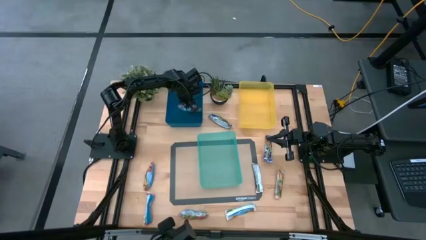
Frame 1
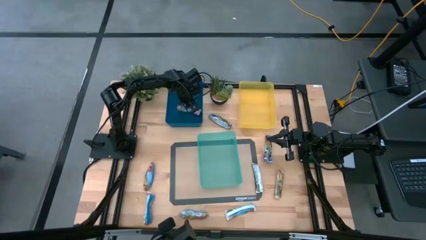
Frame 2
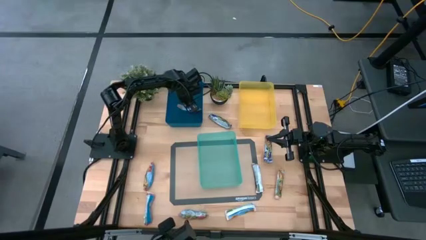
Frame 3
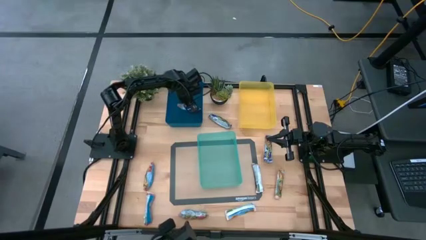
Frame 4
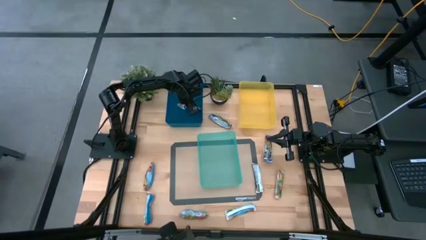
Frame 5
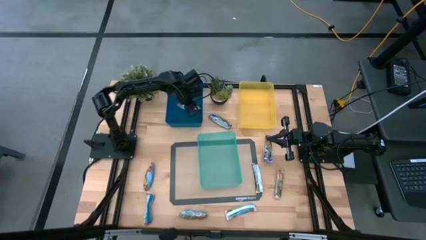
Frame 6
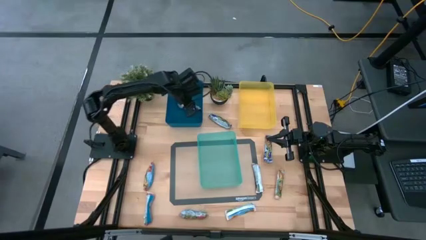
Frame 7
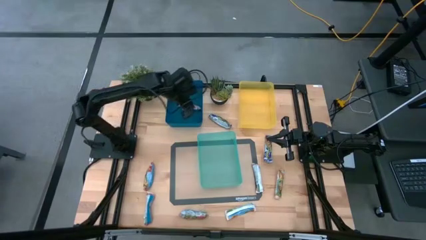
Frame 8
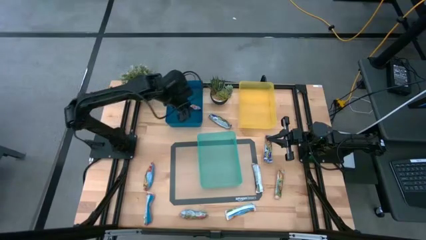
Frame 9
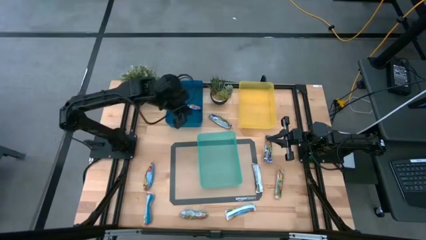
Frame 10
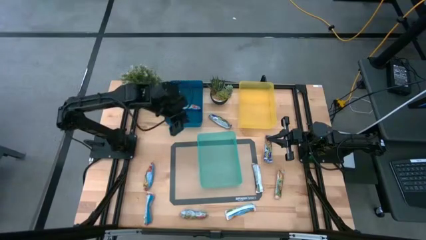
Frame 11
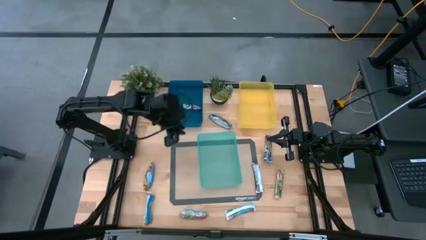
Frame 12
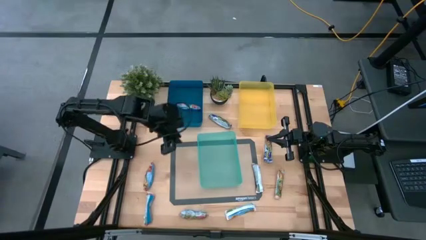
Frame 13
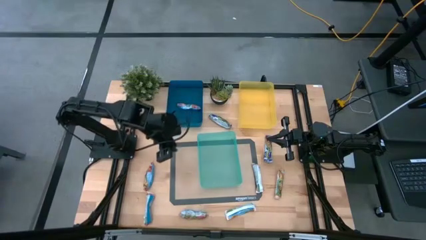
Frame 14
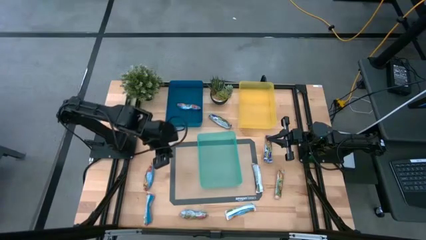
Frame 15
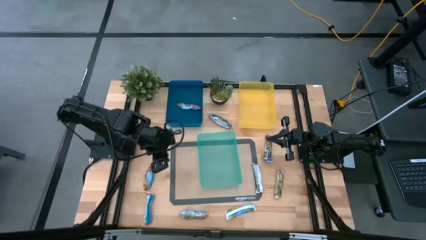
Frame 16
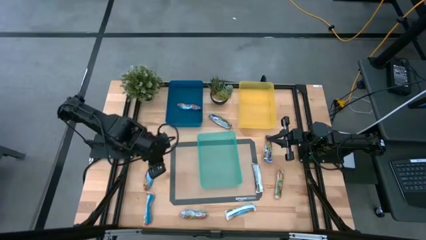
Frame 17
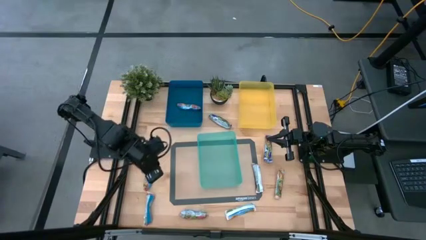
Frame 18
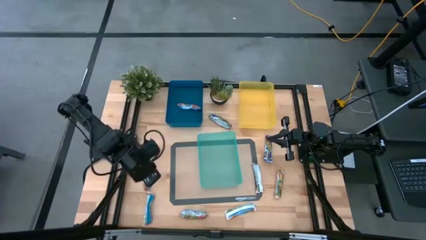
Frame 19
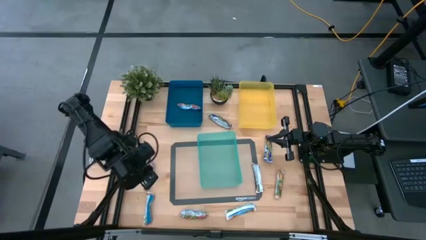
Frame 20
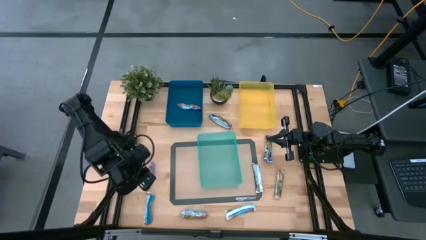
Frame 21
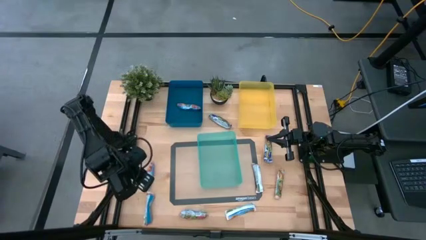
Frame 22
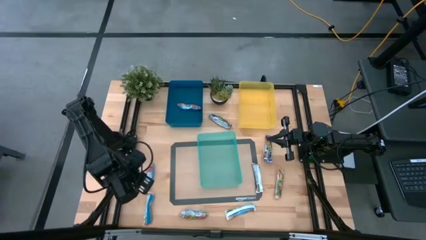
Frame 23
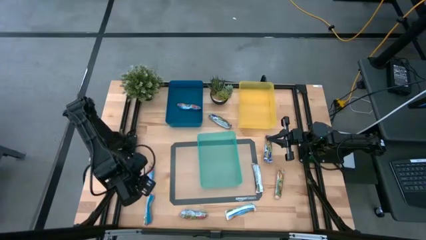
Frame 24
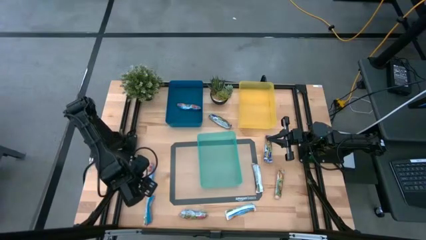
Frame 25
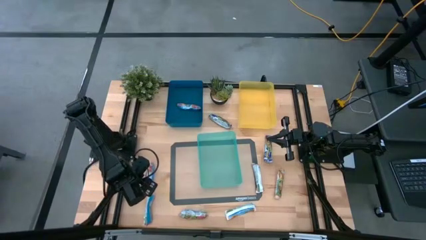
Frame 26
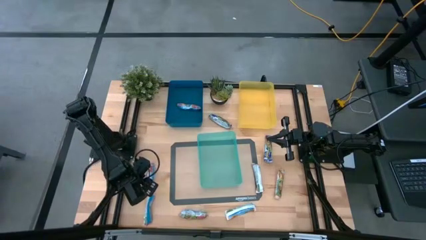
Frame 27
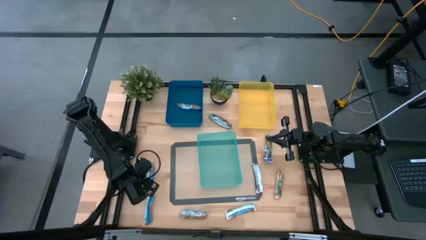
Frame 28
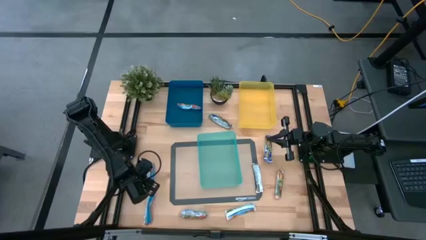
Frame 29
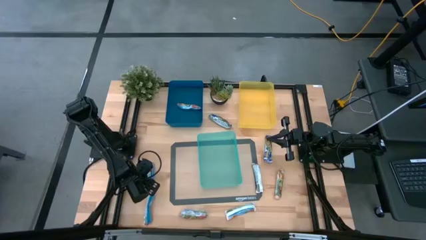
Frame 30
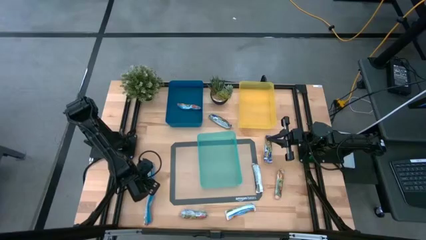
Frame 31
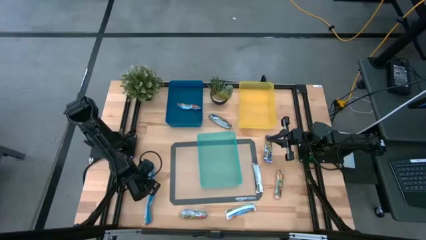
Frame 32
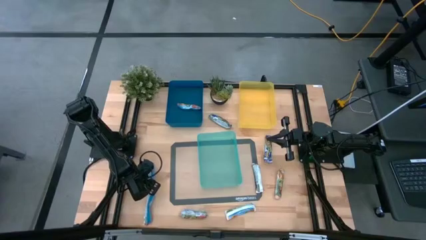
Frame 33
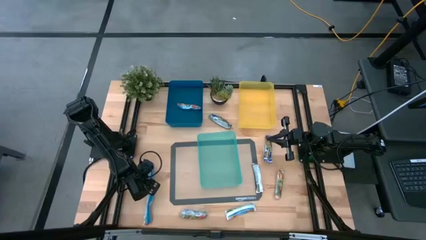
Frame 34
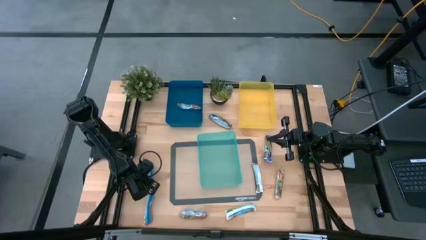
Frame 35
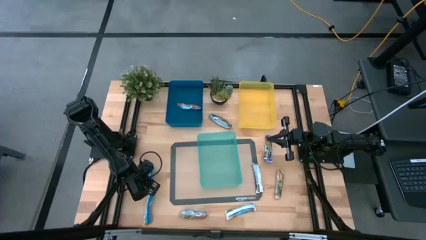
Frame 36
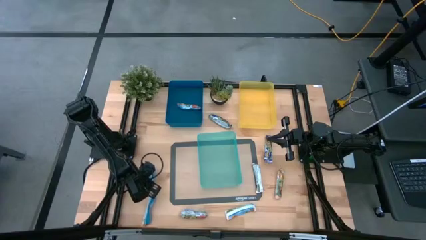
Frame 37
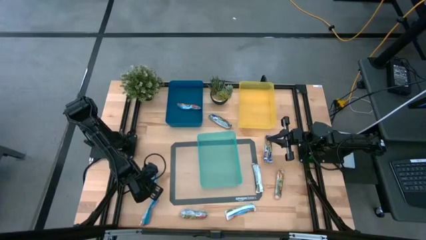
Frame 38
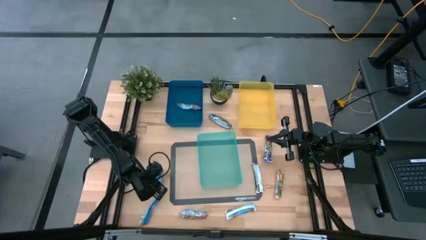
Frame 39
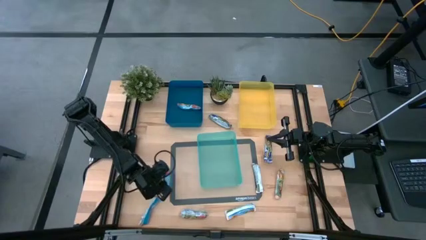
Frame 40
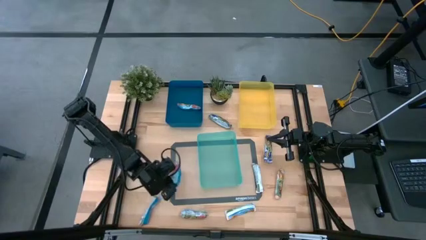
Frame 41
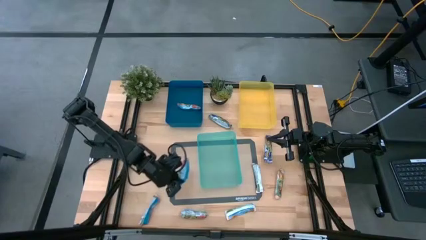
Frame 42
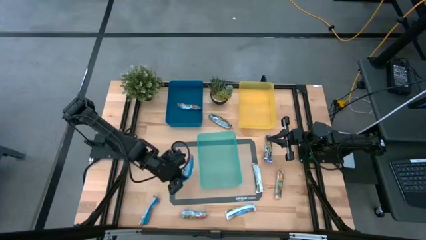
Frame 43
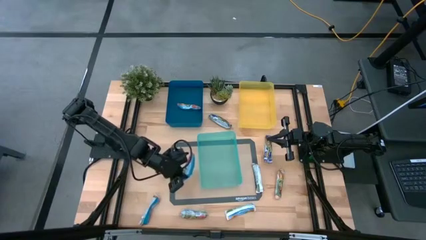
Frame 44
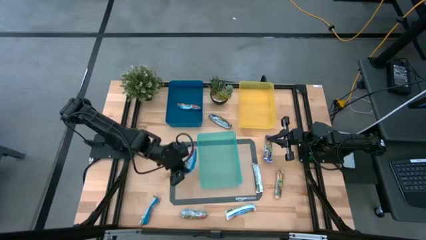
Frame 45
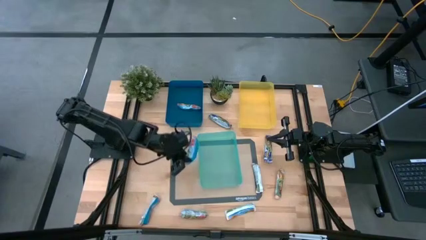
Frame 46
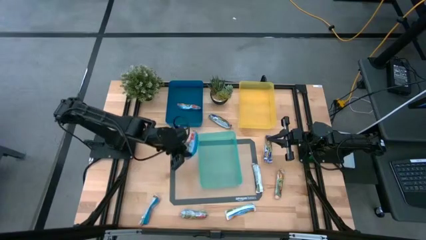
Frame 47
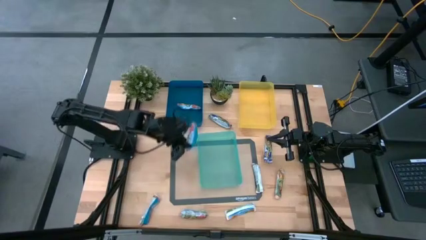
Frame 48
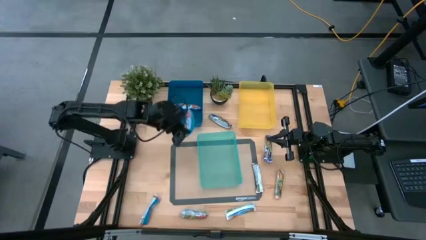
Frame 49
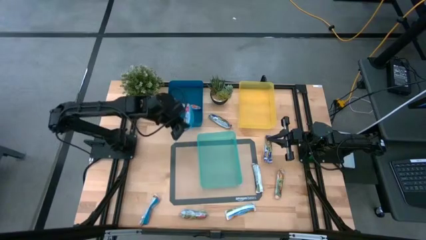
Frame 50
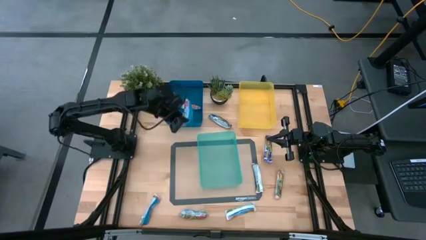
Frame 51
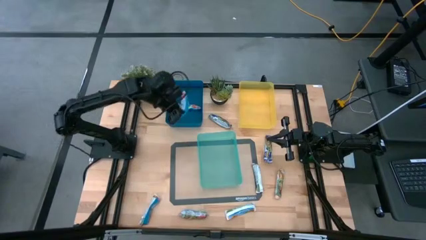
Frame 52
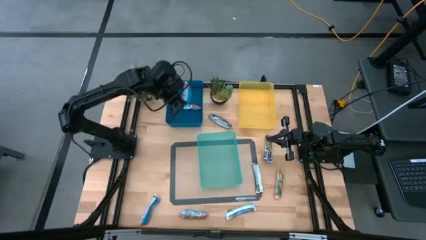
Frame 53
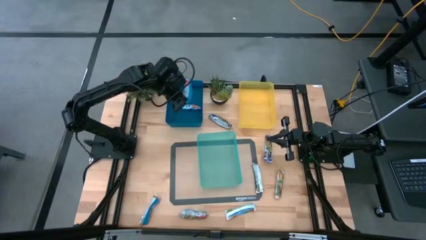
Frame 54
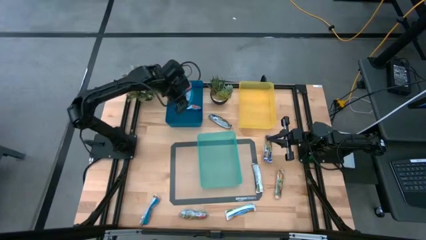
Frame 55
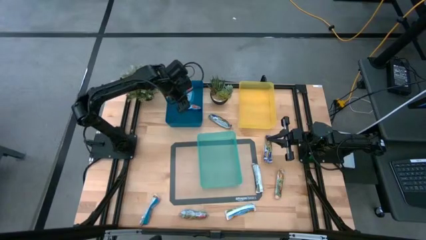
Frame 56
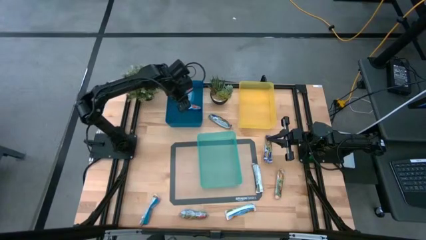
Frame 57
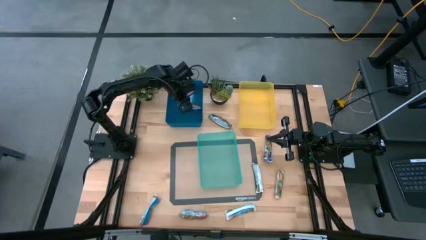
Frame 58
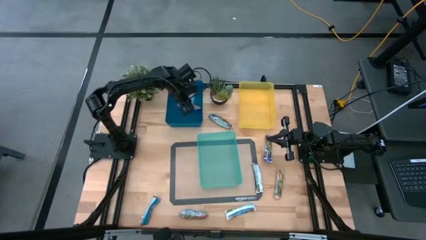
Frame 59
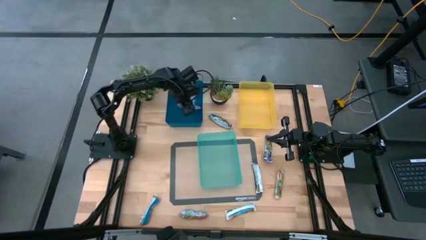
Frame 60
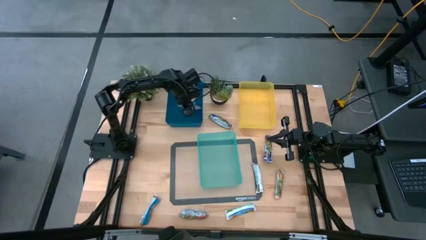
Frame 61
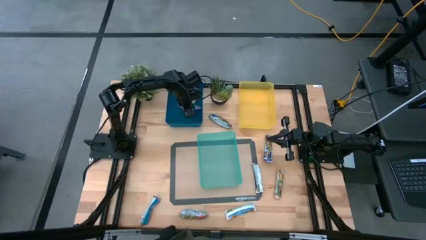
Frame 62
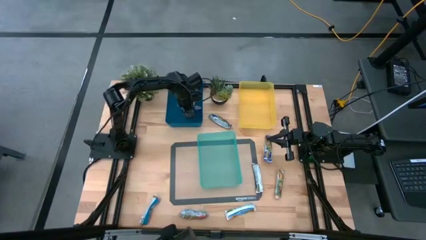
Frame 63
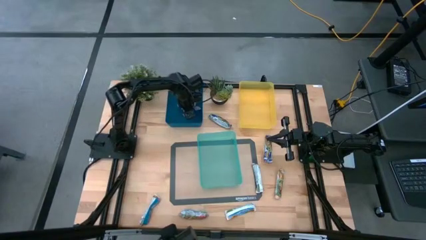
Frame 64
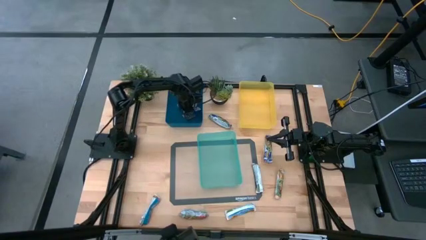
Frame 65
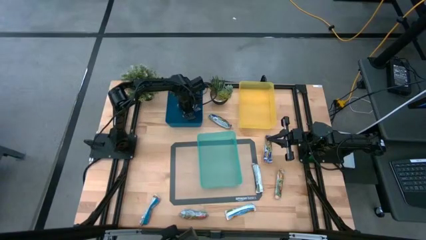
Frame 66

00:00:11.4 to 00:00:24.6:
Task: Pick and place Granola Bars by type
Put the red granola bar into the dark blue bin

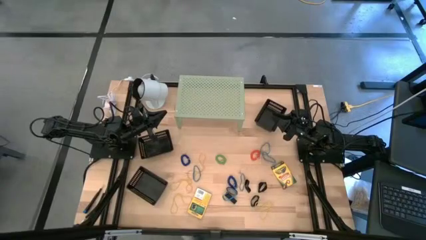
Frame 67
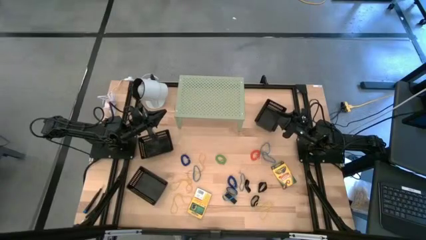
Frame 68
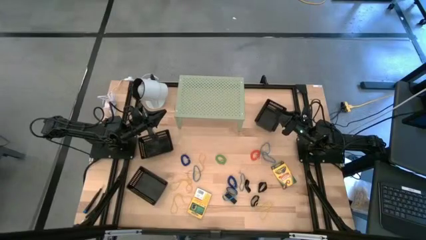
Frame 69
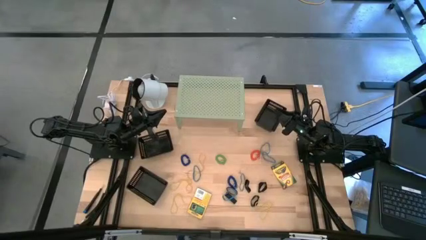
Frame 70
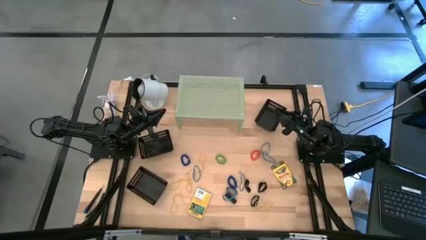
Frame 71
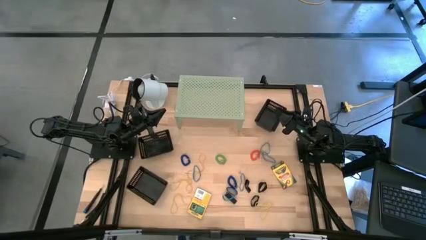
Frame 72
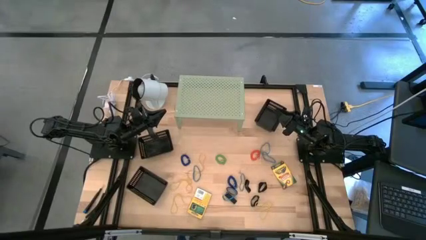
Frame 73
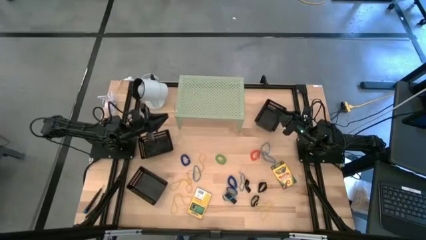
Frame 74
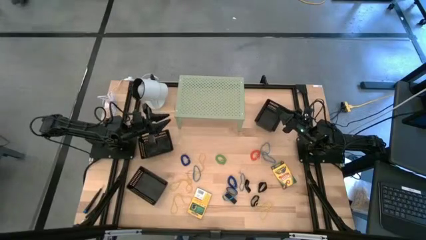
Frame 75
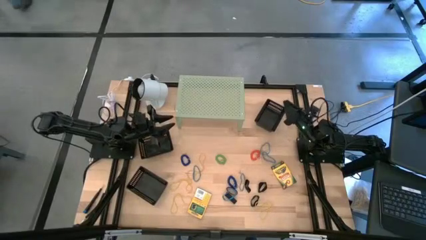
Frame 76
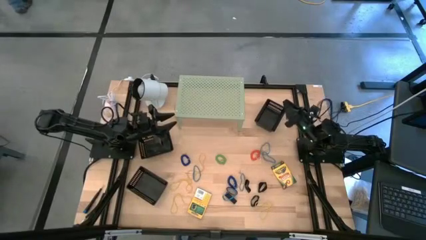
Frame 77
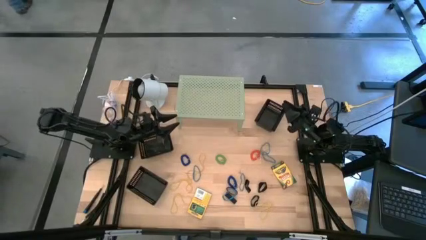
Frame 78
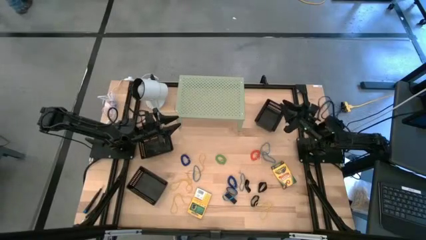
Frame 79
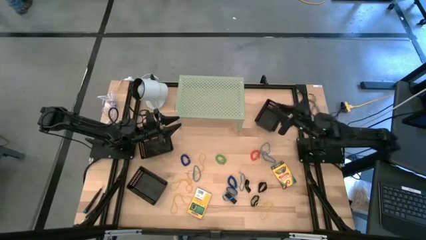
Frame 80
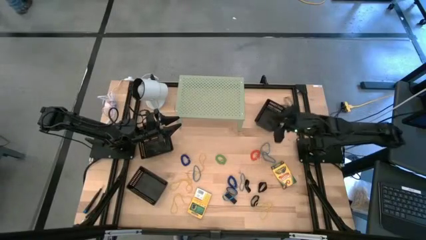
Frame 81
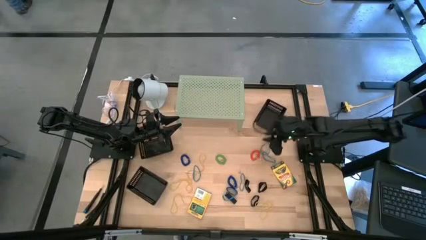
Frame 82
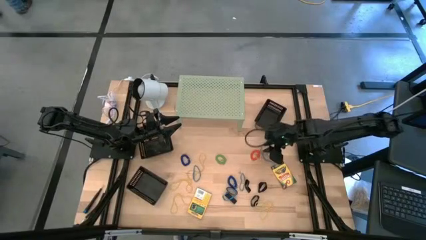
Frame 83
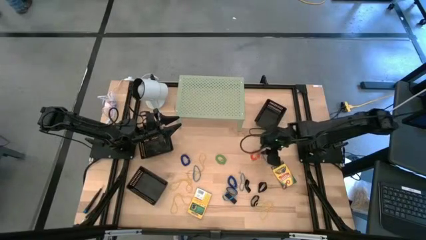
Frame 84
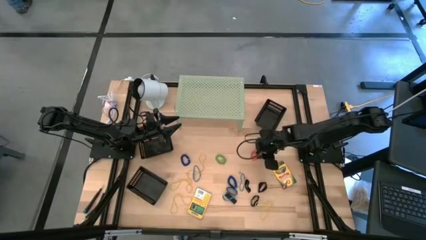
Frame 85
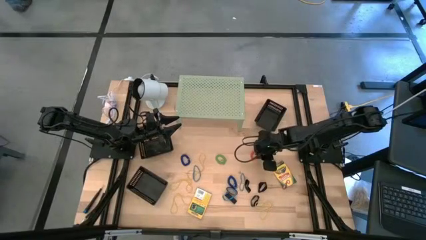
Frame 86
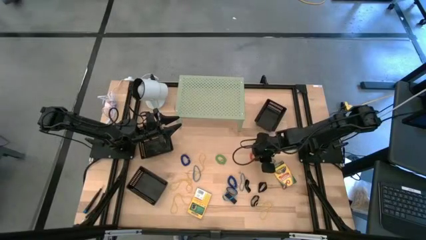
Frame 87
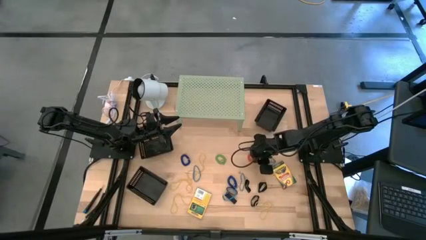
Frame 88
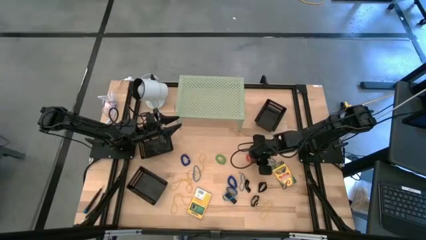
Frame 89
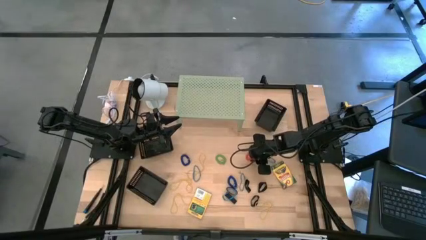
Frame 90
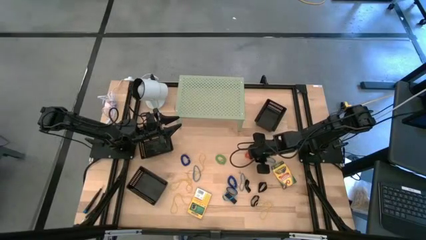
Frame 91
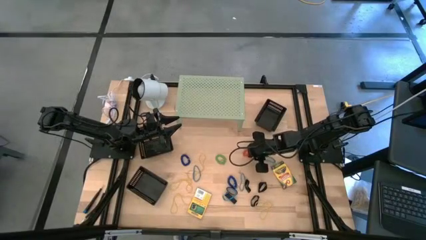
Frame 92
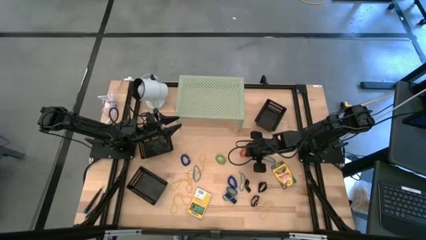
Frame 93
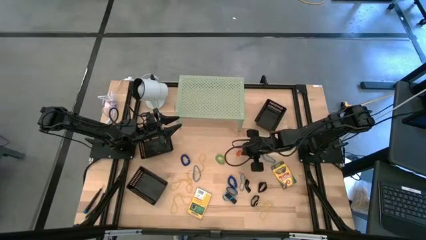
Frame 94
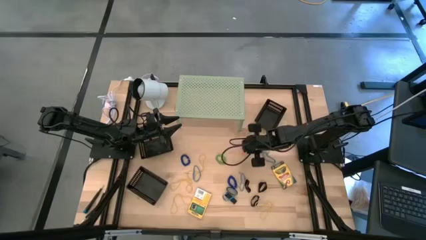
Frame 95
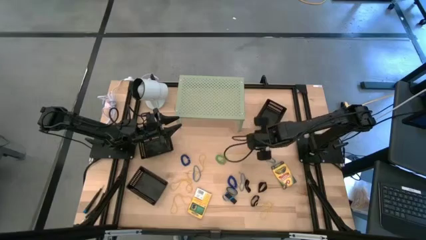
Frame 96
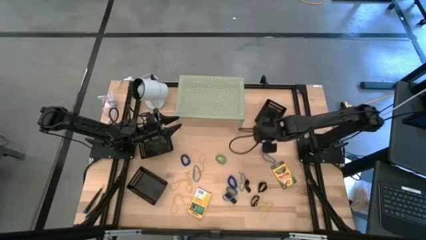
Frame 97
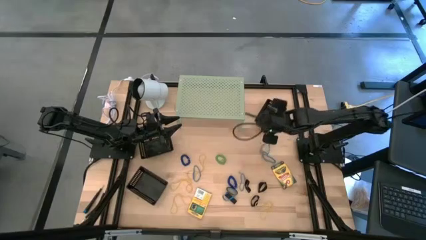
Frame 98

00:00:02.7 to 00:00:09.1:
Task: Pick & Place Office Desk Supplies
Put the orange spring keychain into the top right black bin
